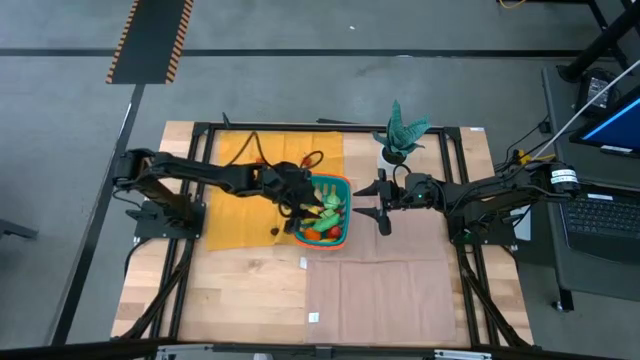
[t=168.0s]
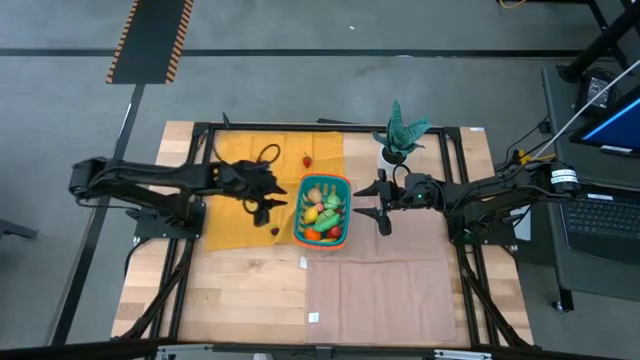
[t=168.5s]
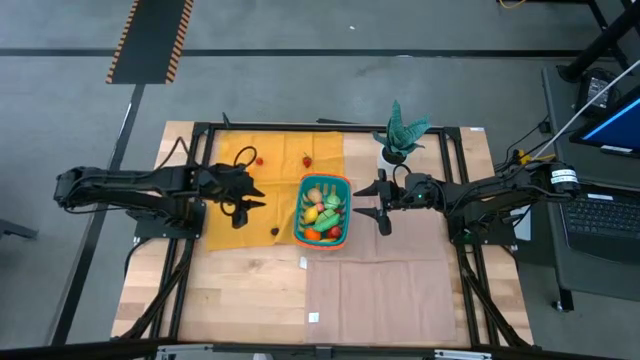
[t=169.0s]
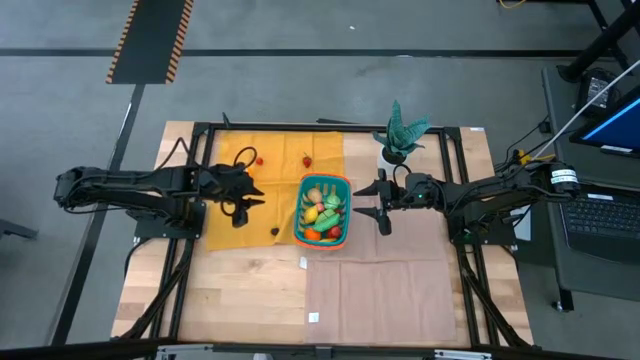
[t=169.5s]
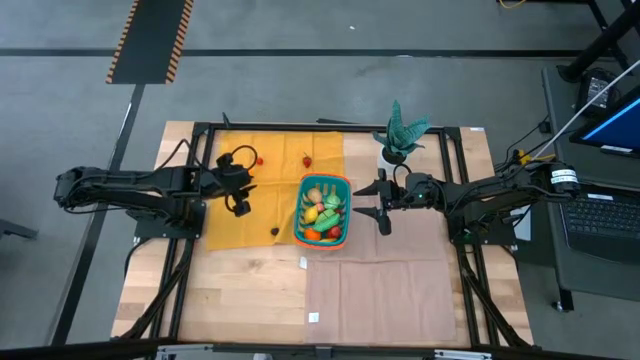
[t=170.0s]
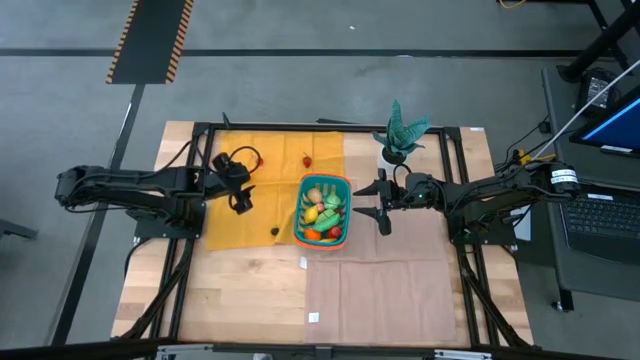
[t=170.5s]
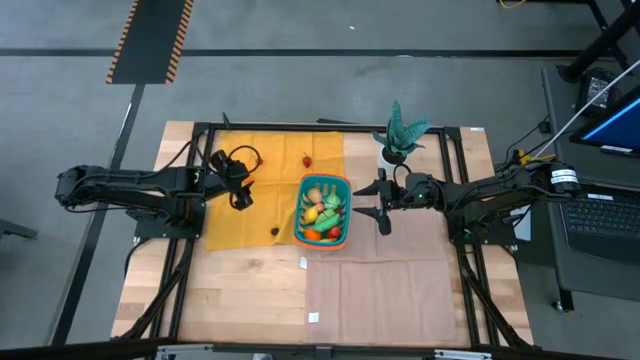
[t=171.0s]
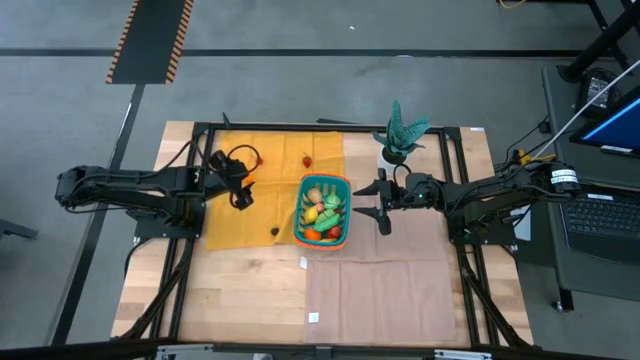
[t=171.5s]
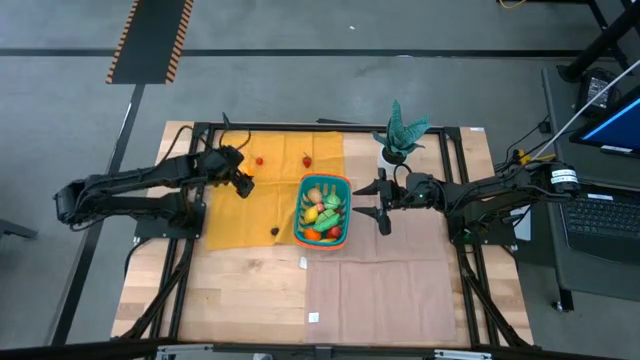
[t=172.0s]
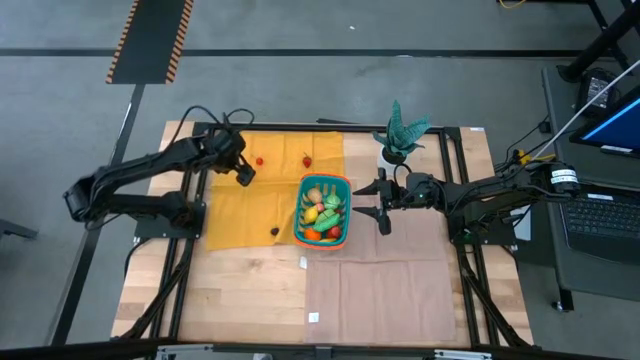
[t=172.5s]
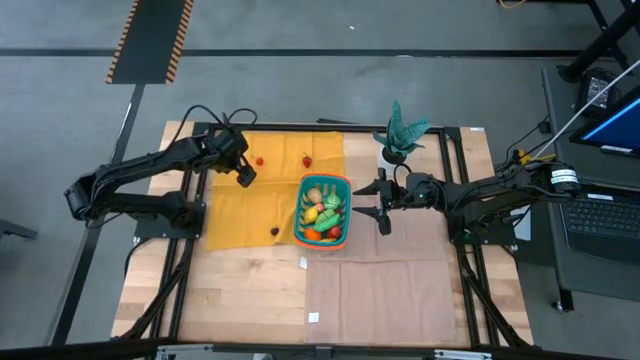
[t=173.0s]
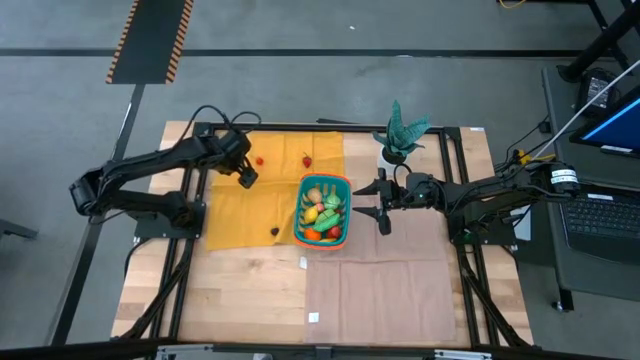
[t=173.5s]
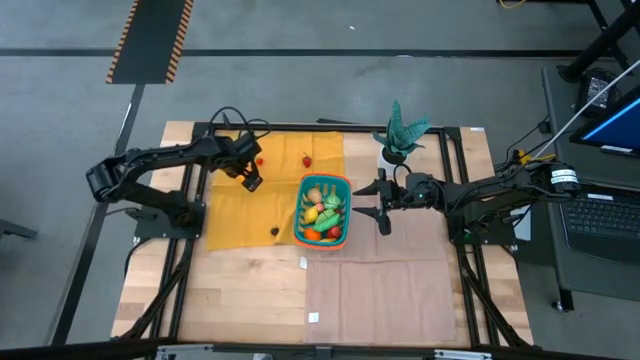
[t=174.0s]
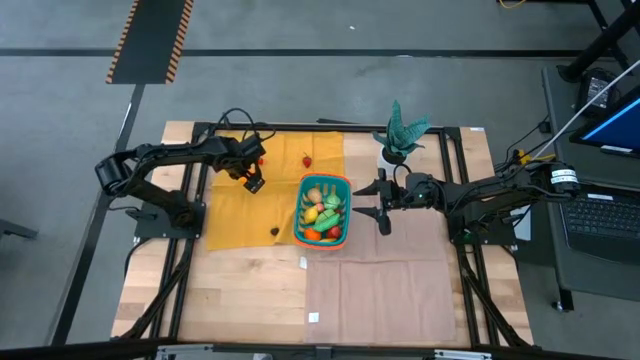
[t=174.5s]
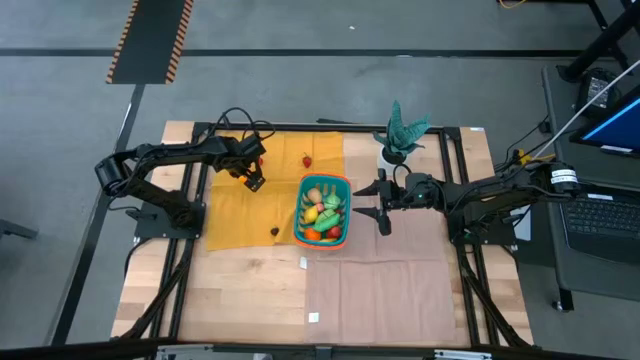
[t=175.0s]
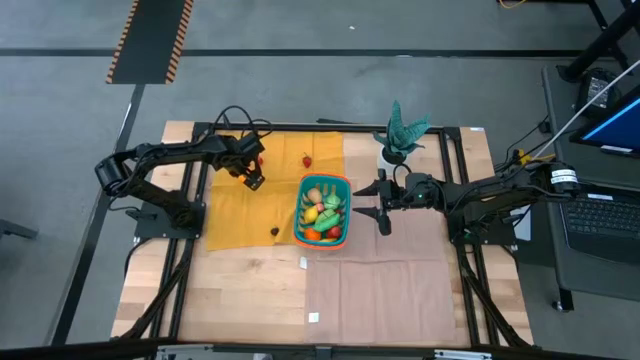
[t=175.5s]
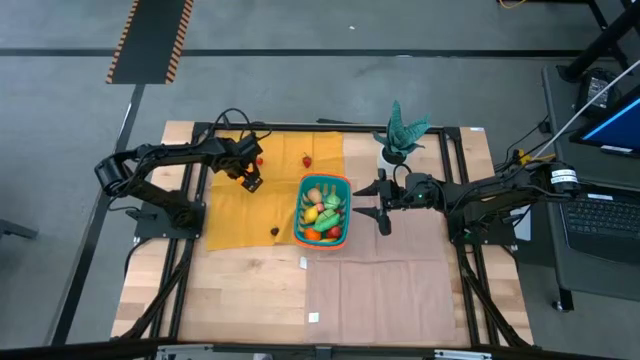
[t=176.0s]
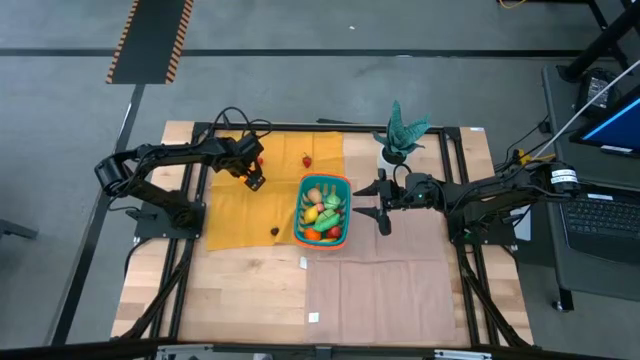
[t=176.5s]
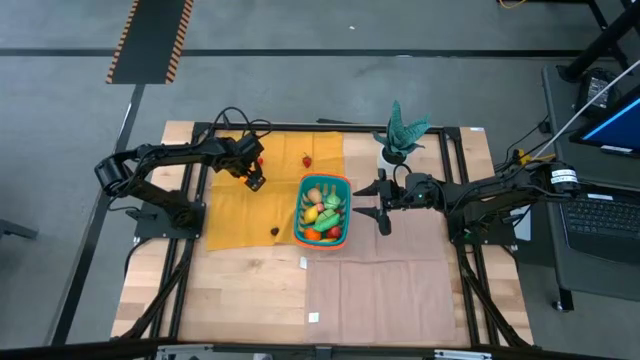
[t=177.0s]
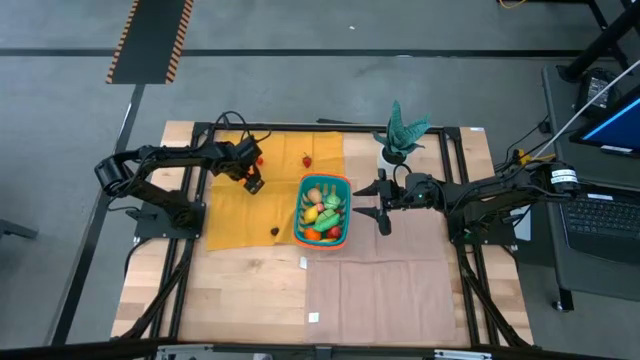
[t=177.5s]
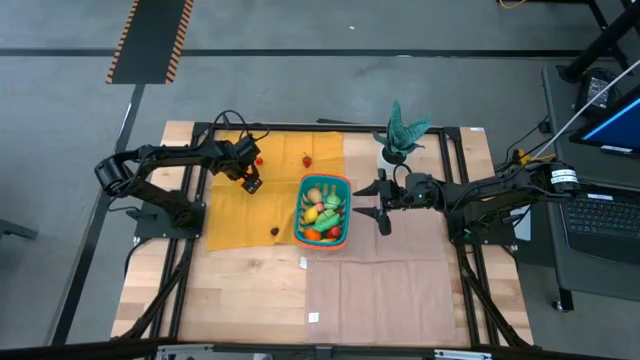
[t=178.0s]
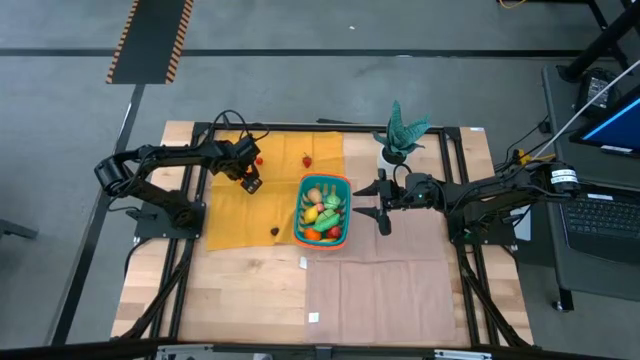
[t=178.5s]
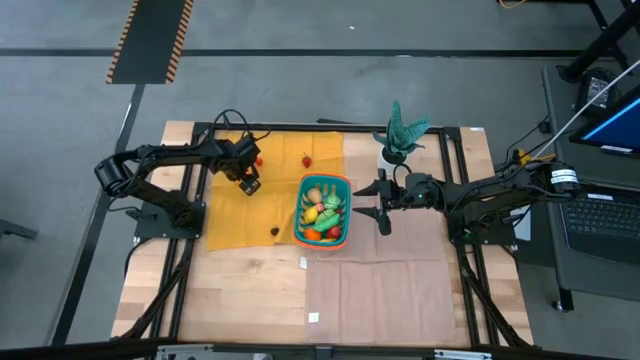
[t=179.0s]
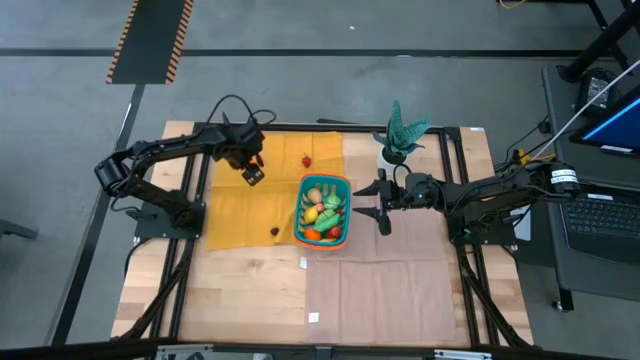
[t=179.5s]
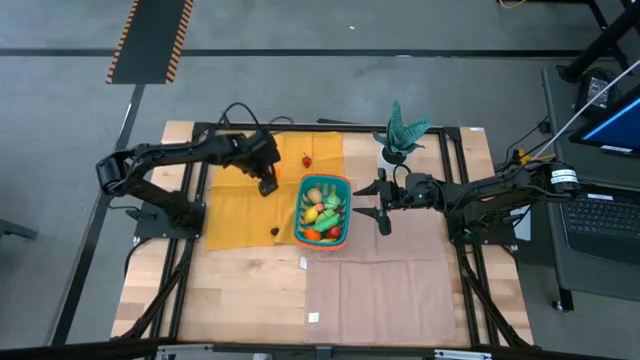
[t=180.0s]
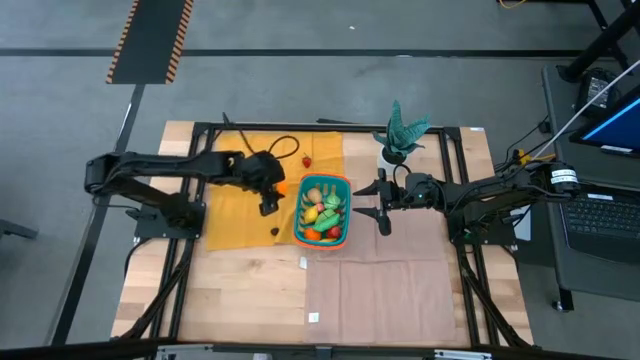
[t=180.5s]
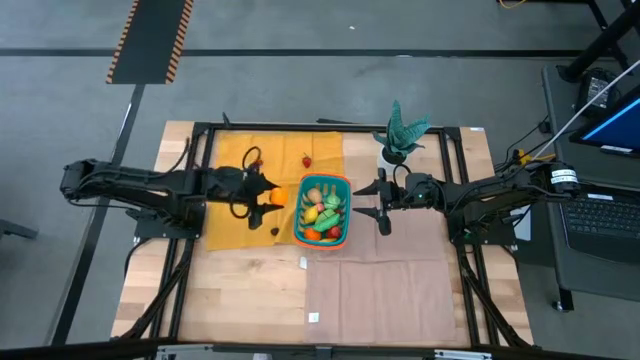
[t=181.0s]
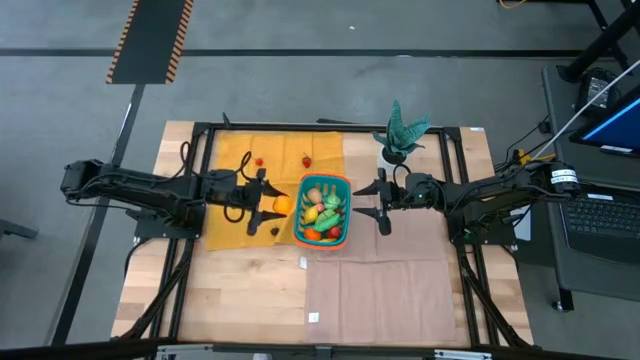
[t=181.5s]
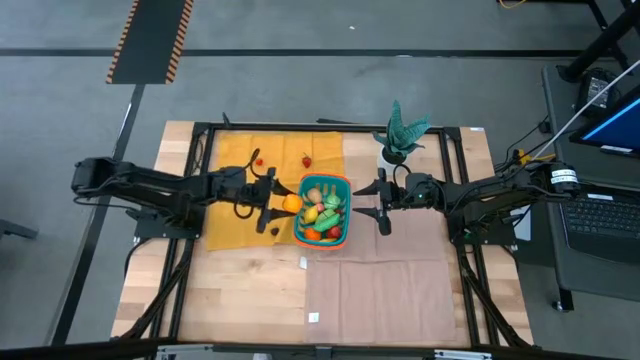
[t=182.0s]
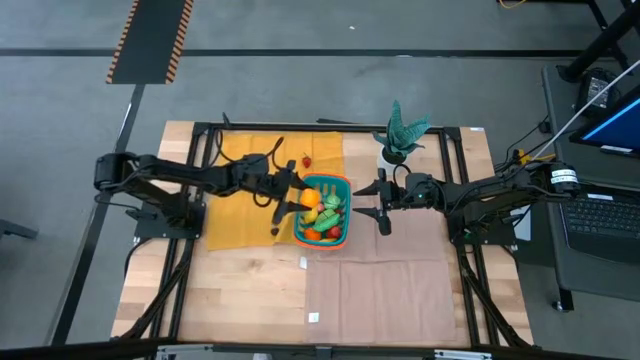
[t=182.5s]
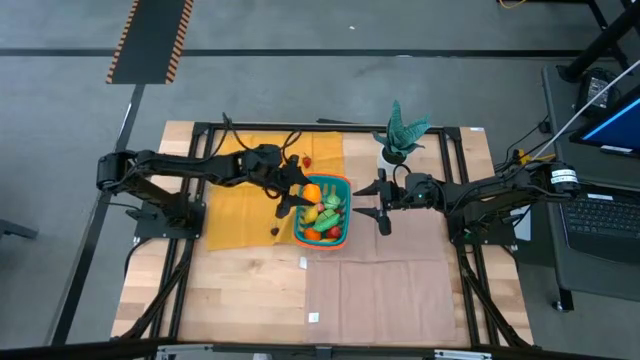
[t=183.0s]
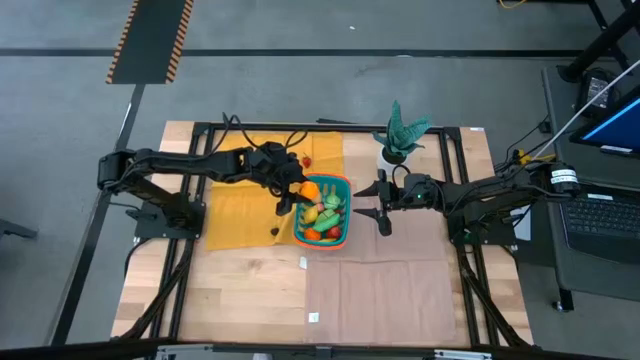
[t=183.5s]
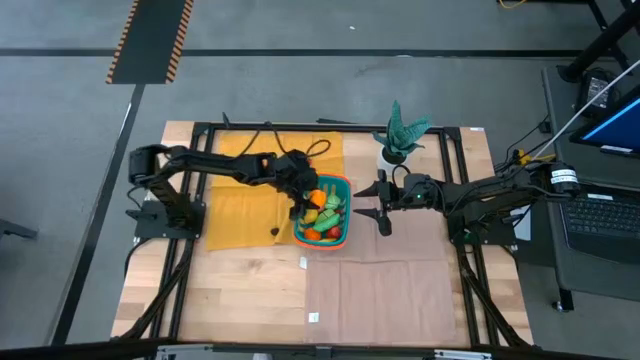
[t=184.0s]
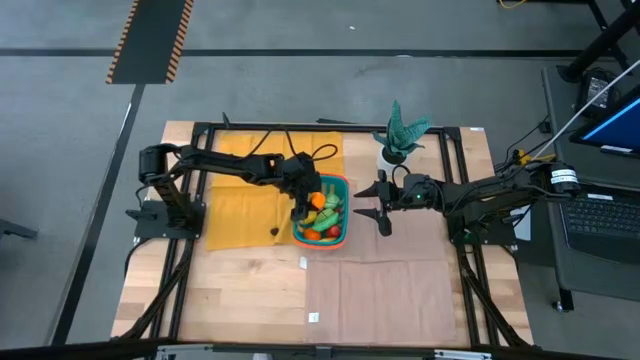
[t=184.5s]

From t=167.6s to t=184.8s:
Task: Pick and placing Produce into tupperware
Put the orange into the basket

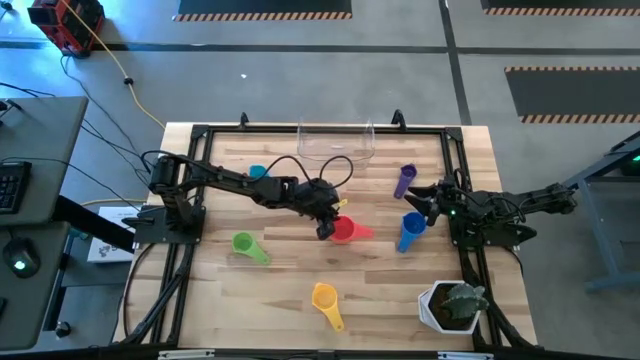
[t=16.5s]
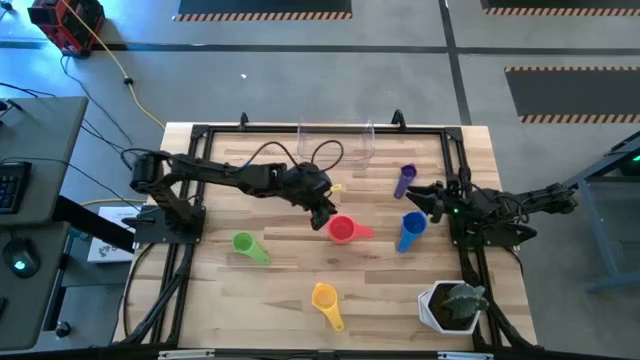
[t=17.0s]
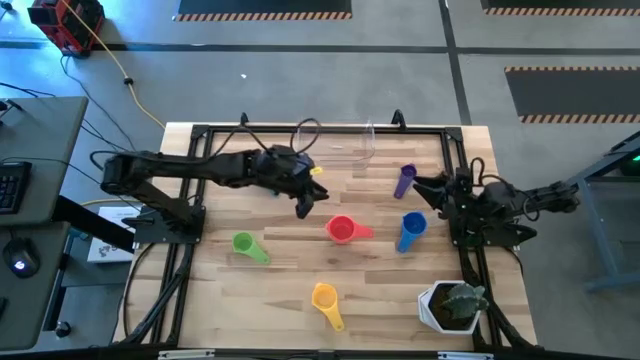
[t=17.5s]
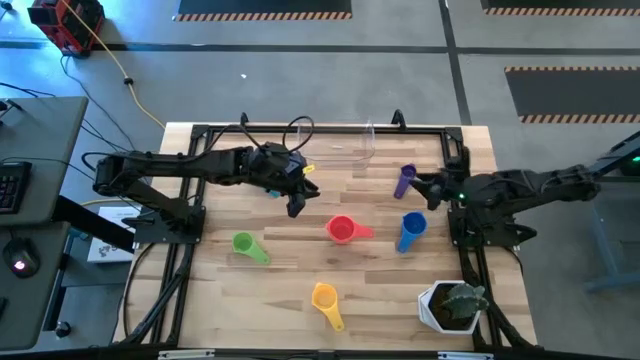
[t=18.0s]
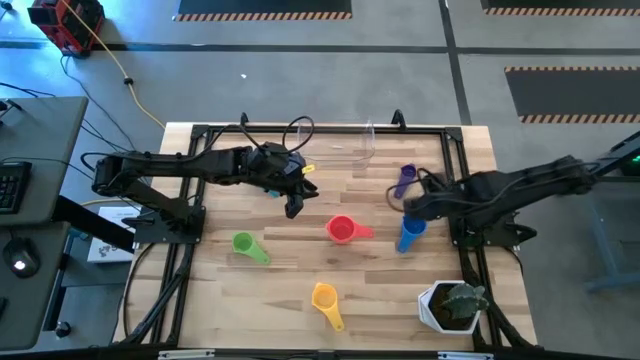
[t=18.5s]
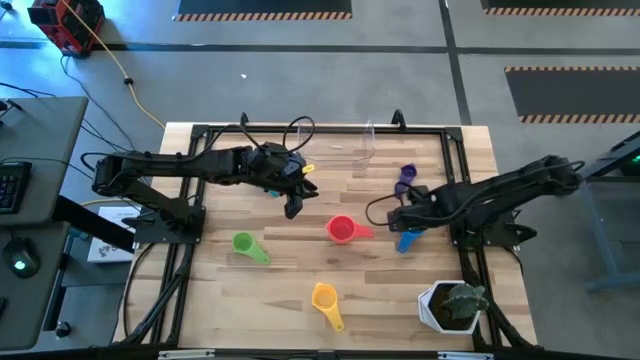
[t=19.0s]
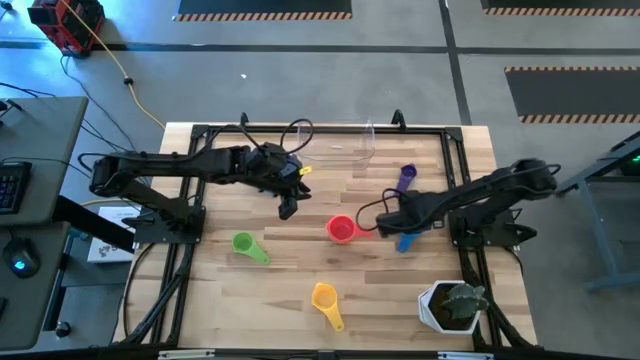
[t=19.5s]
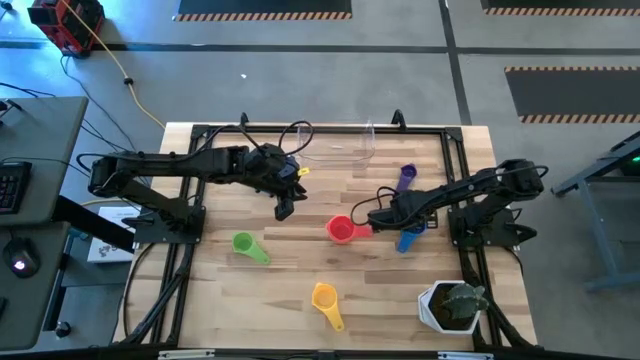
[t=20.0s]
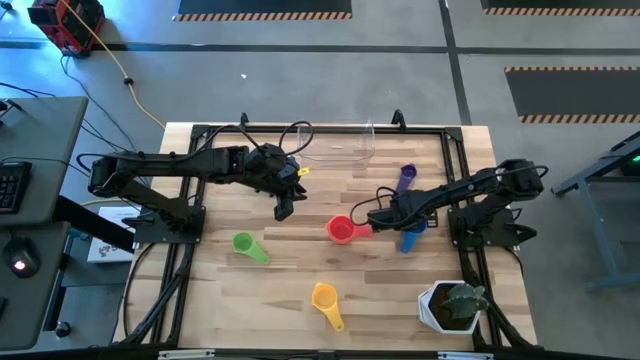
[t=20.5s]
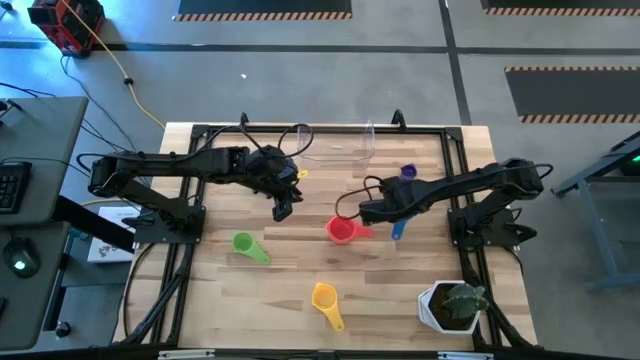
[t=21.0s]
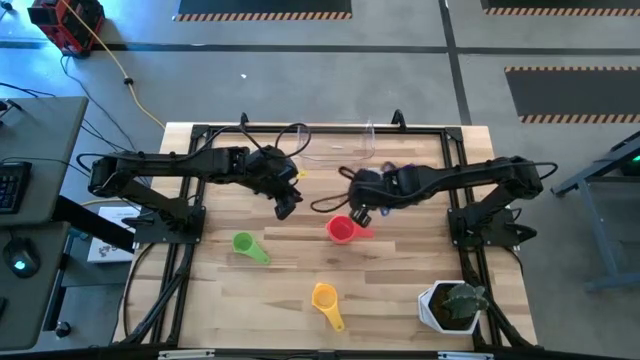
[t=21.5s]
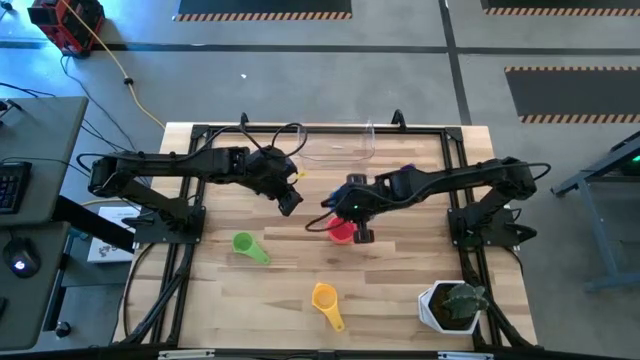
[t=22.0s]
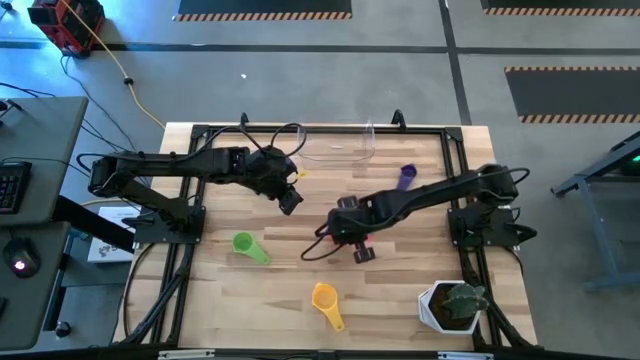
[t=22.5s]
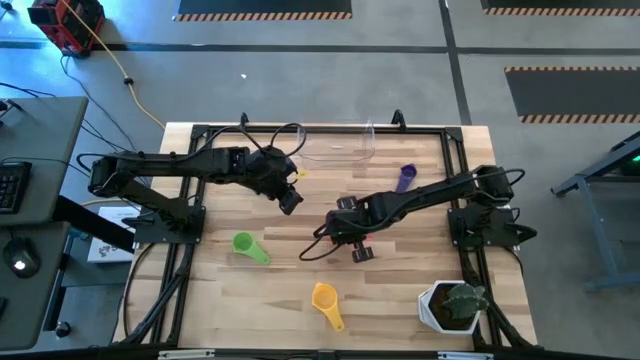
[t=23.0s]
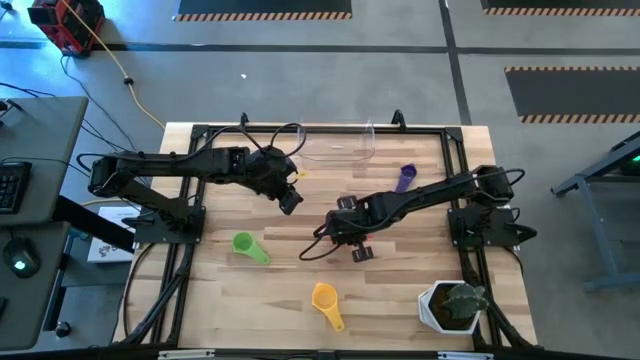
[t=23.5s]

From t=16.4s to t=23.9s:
Task: Nest measuring cups in basket
Stack the blue measuring cup on top of the red measuring cup
